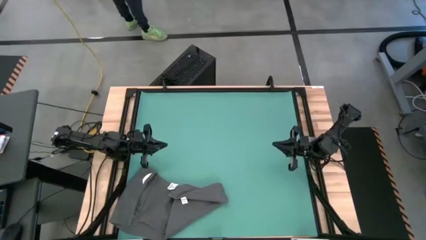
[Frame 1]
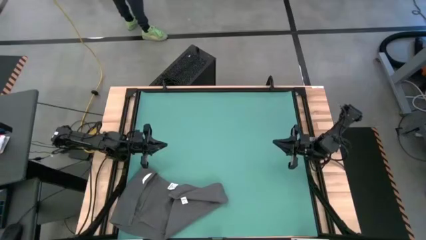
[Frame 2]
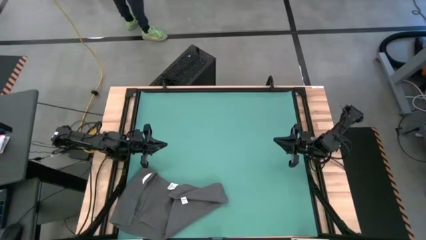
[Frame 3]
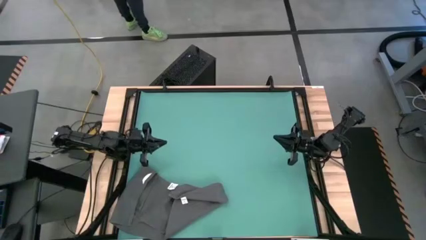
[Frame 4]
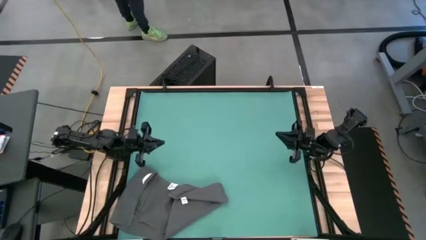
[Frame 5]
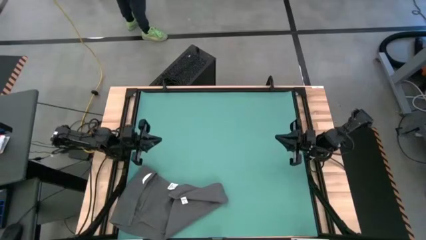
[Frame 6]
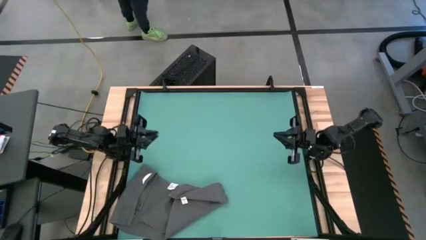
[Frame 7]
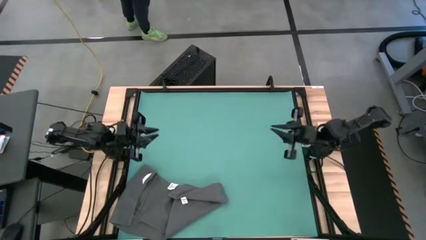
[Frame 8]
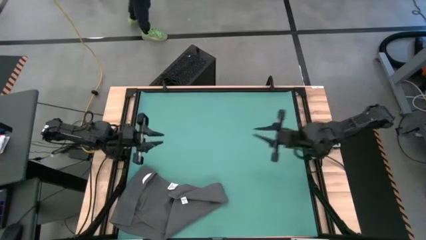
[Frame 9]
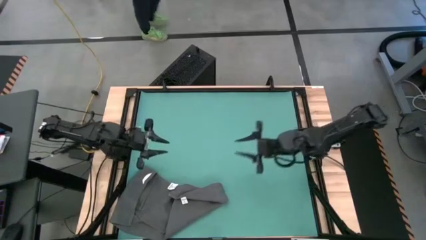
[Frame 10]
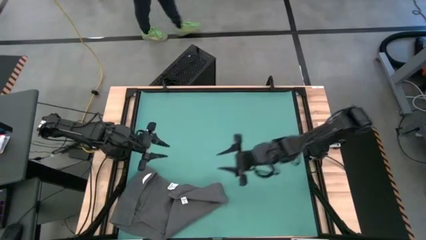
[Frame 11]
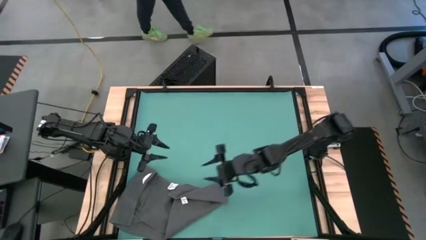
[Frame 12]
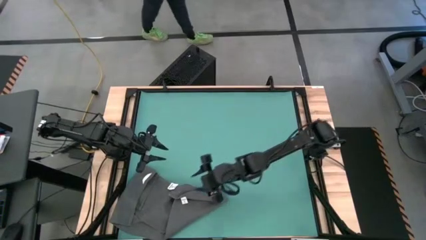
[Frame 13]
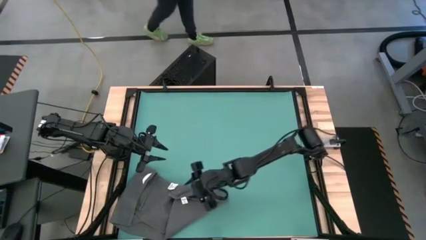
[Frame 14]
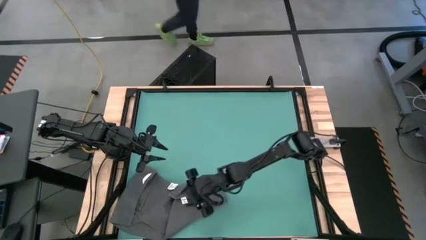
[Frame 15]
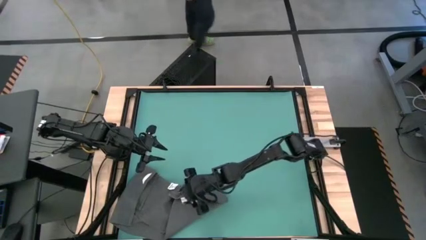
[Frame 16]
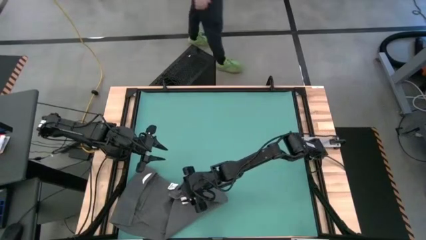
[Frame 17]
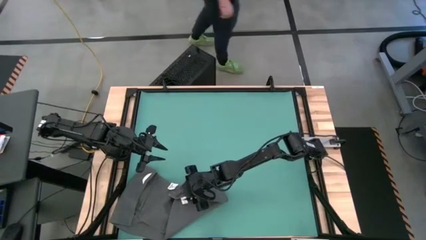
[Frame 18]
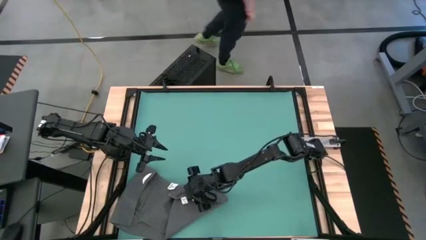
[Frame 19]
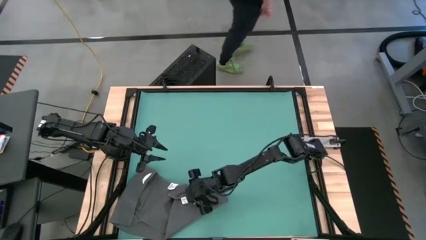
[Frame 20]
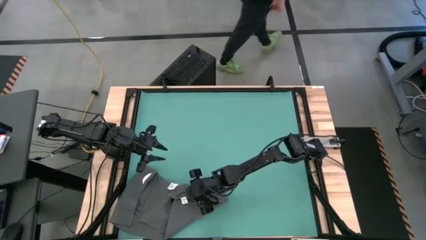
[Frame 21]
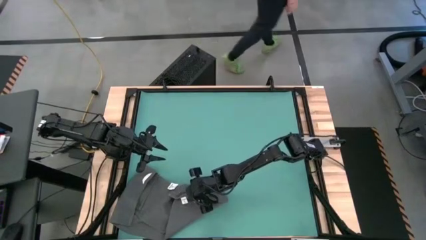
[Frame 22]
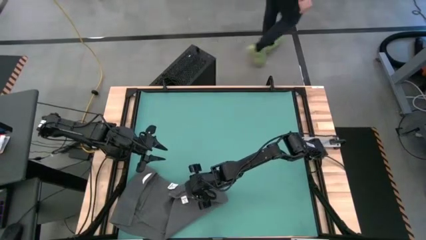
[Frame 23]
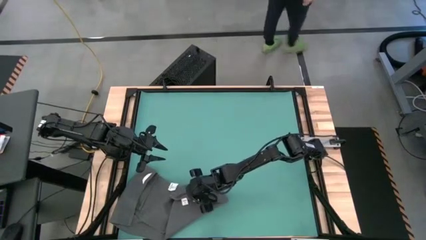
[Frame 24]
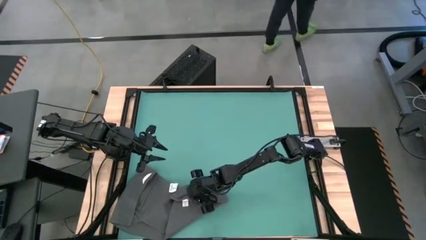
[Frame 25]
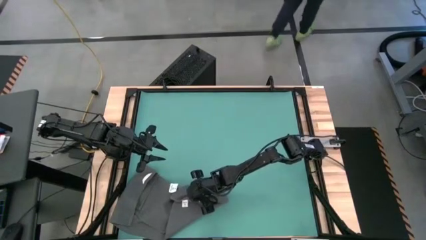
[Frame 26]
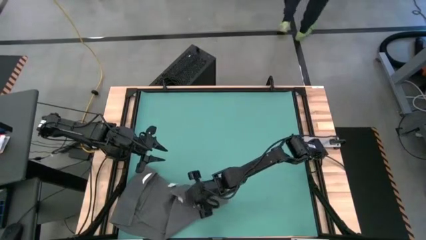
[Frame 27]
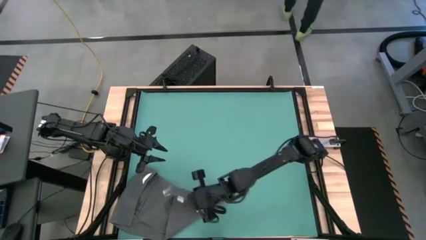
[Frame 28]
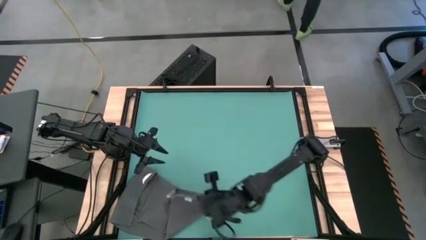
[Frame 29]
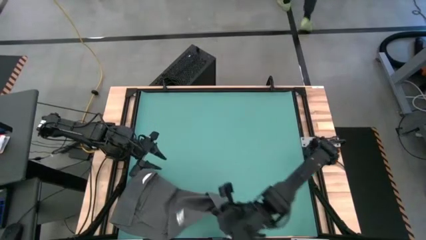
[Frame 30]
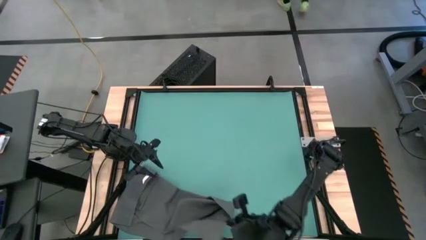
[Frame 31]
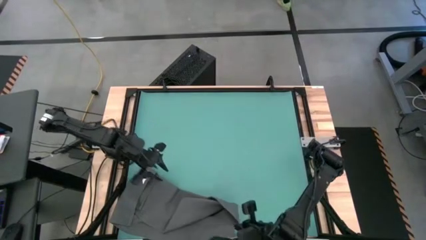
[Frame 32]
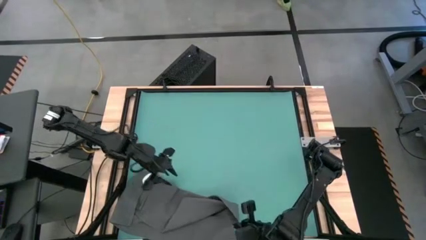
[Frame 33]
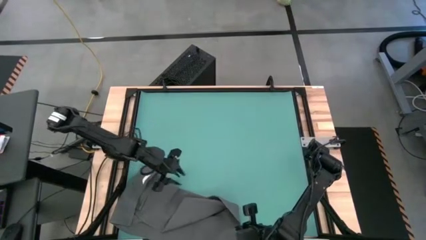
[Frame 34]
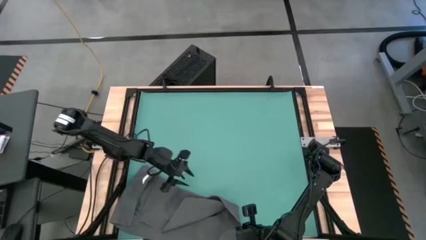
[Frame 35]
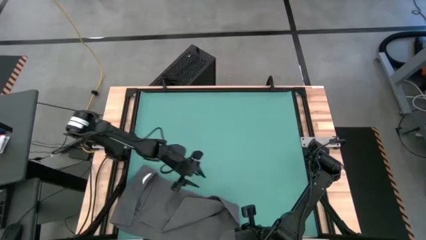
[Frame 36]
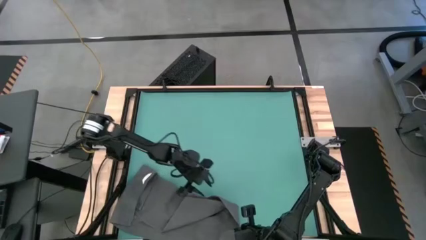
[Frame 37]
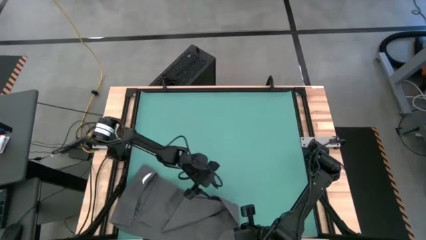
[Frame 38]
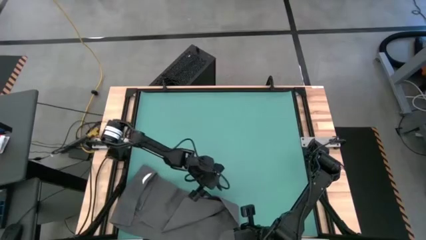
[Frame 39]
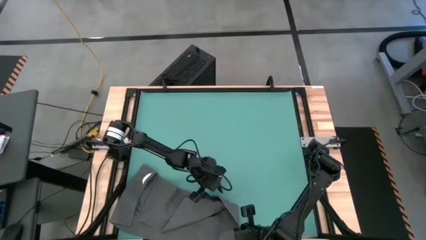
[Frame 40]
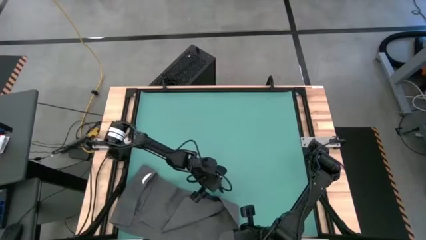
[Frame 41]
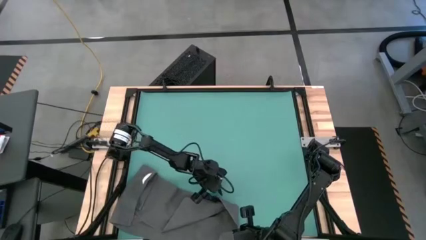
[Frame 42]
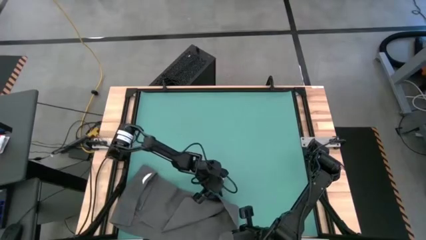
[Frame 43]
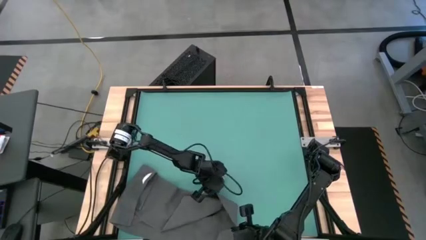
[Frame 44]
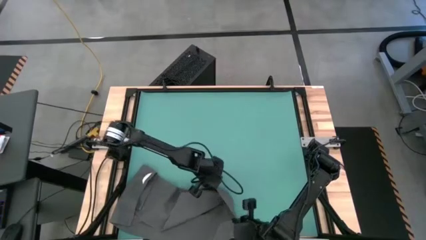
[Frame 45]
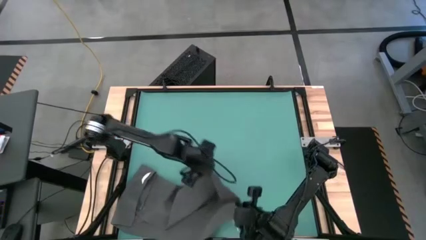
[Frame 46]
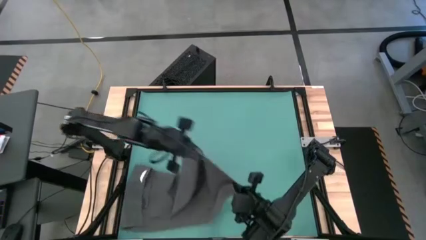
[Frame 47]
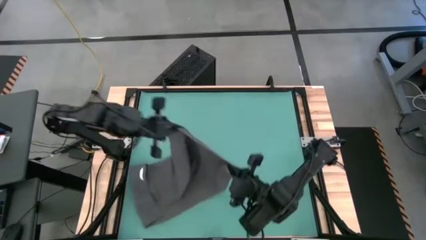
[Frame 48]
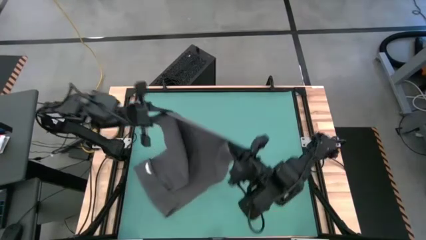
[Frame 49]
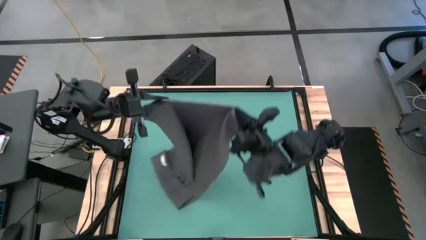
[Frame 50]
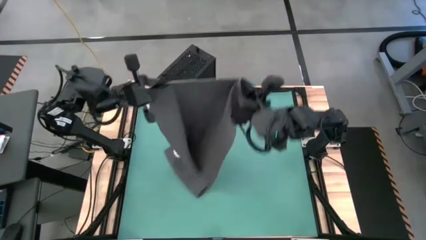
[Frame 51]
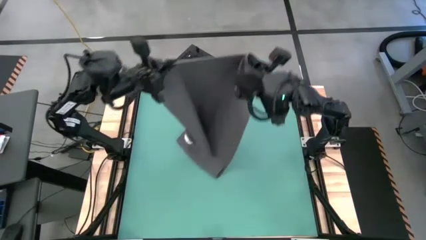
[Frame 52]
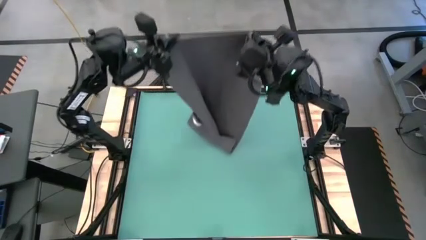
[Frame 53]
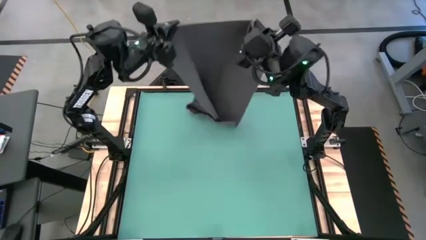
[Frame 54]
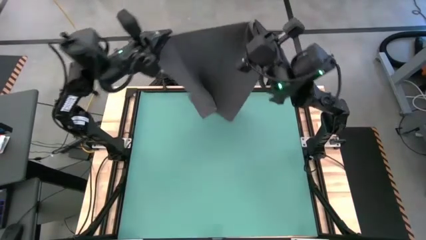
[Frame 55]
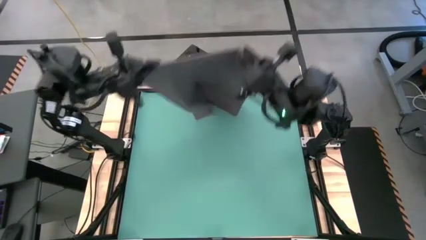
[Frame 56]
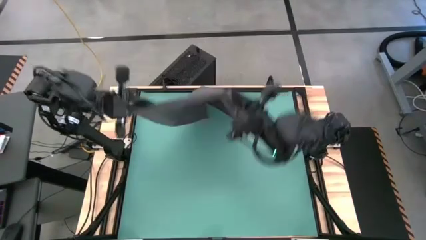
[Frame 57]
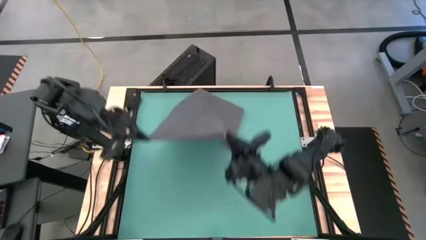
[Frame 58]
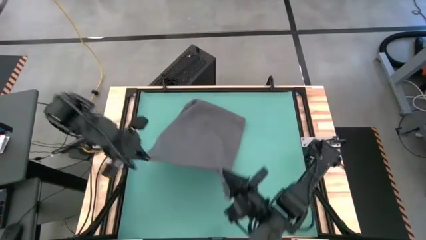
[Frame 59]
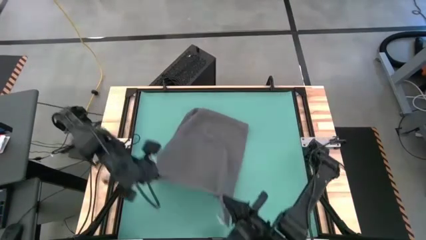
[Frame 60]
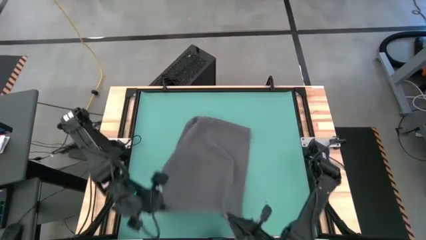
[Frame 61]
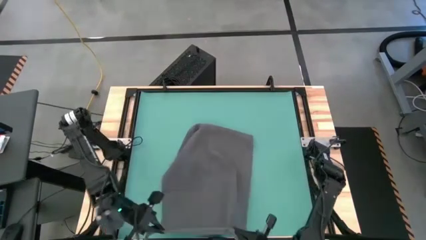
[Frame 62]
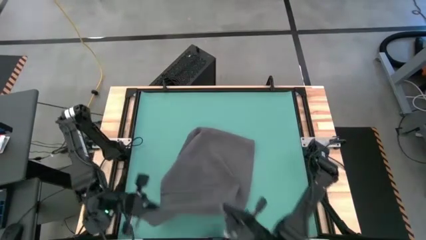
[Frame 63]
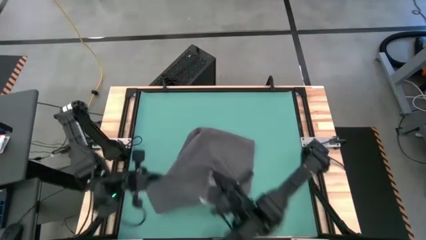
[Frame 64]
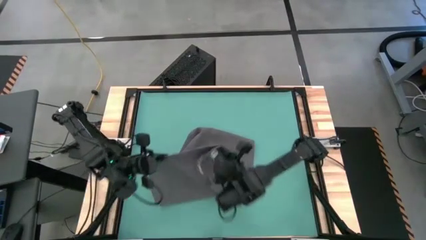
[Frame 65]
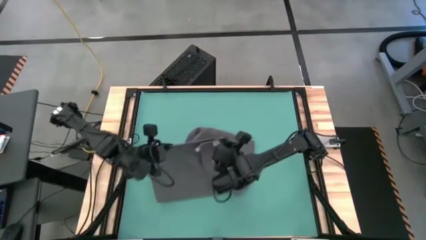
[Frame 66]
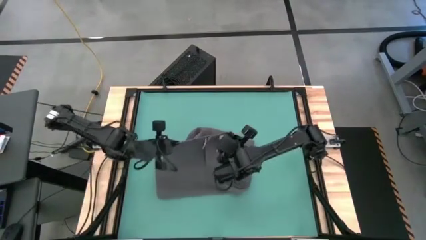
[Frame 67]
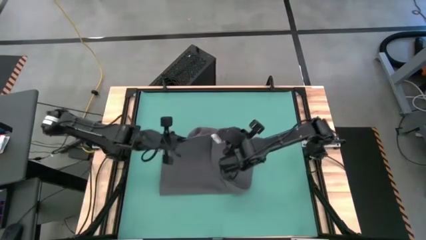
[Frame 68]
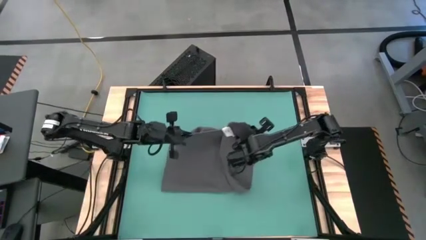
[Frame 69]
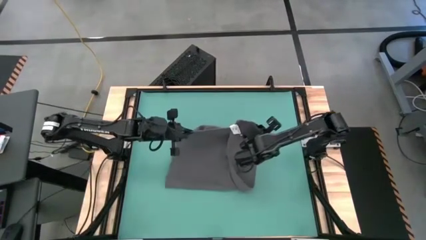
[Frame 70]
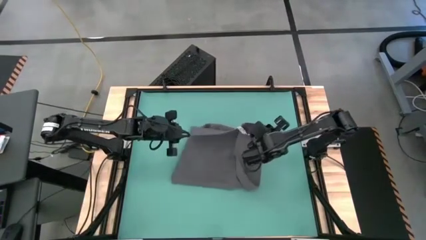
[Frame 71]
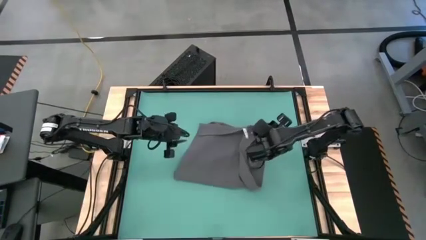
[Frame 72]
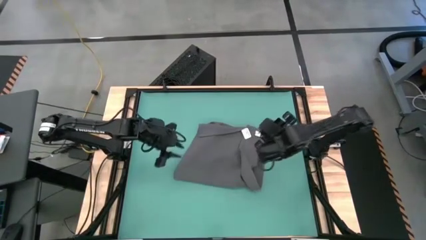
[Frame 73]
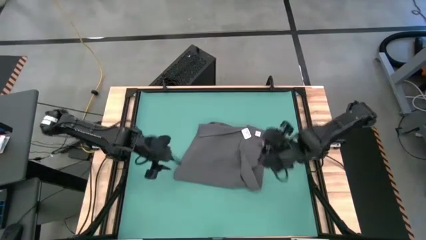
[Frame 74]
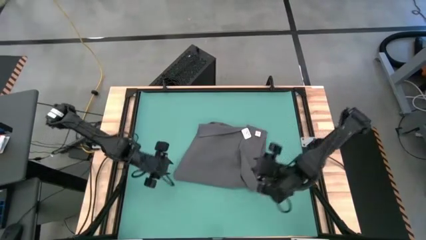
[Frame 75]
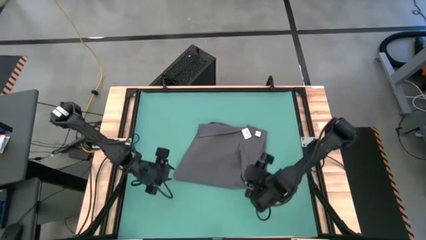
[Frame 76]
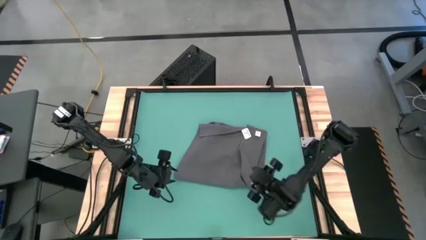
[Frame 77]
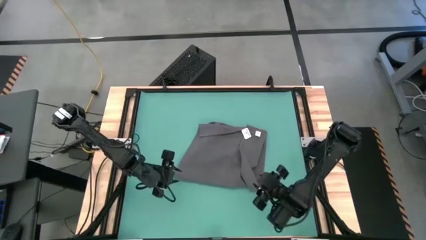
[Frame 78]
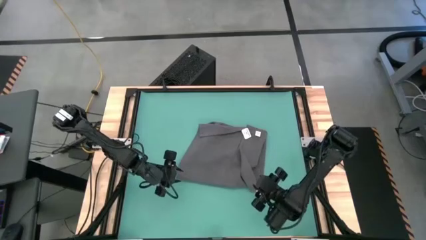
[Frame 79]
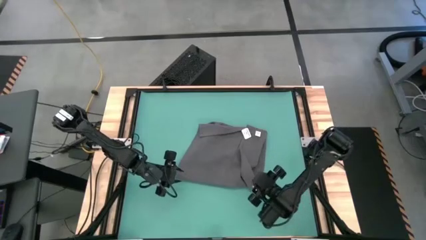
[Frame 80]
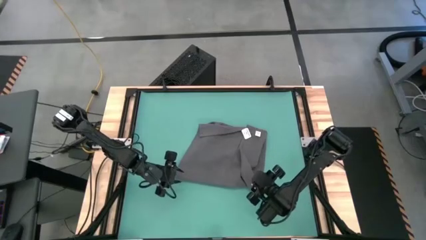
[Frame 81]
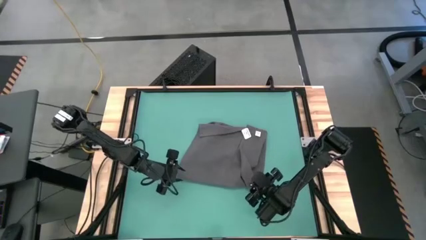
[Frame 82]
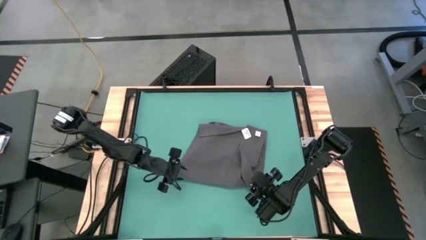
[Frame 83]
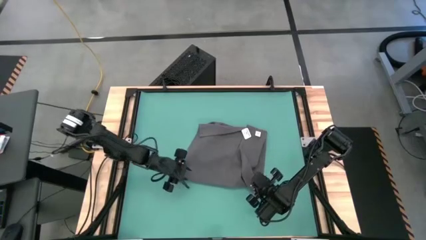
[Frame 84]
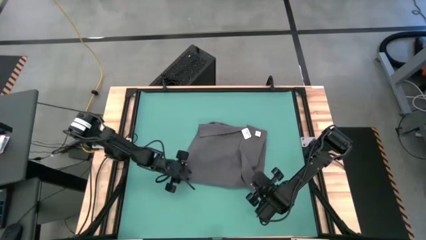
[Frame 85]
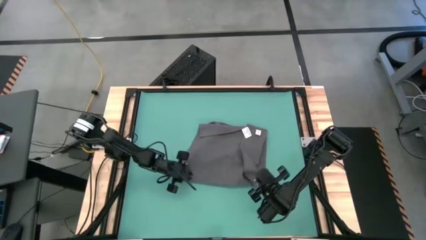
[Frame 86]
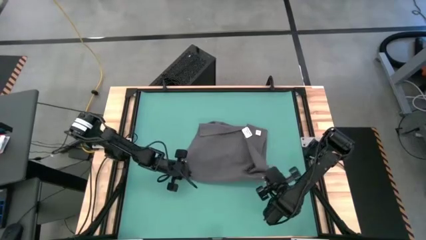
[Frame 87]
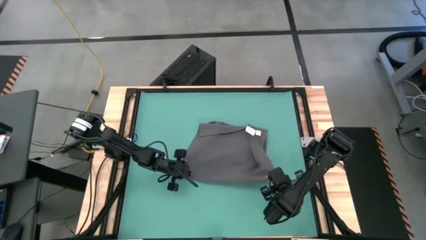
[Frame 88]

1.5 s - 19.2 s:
Task: Roll towel
Roll the gray towel
